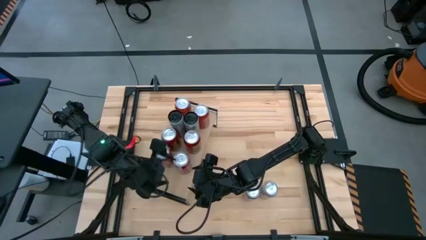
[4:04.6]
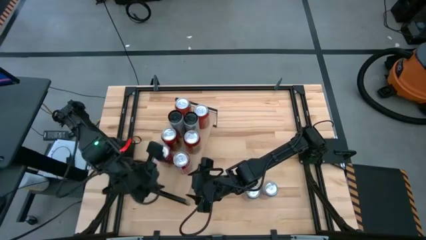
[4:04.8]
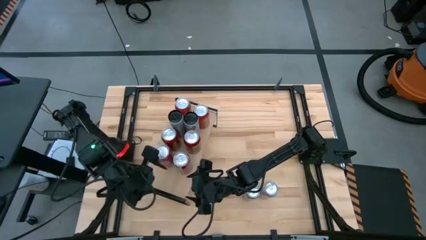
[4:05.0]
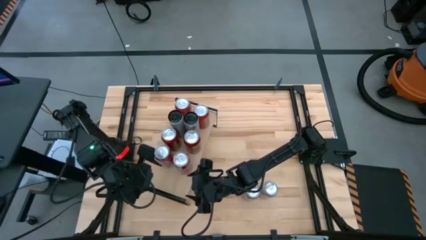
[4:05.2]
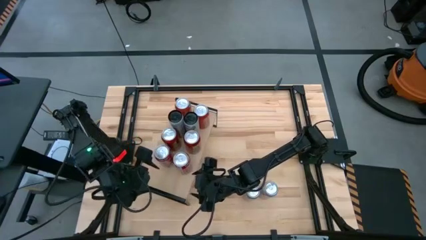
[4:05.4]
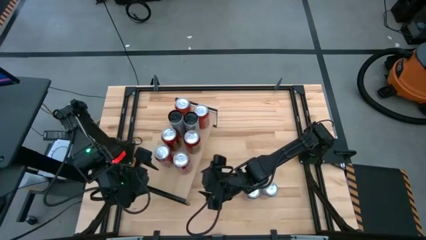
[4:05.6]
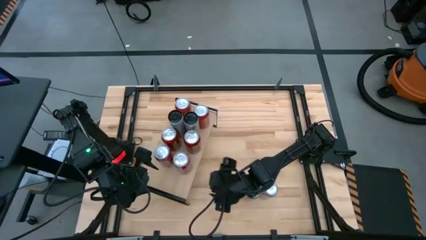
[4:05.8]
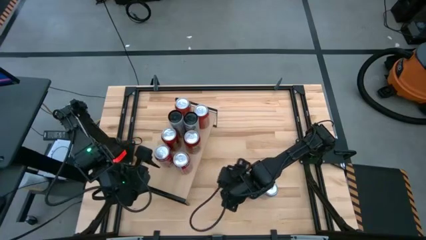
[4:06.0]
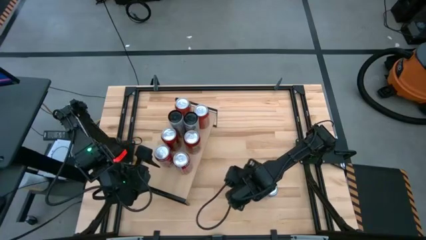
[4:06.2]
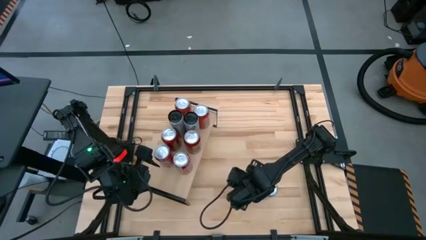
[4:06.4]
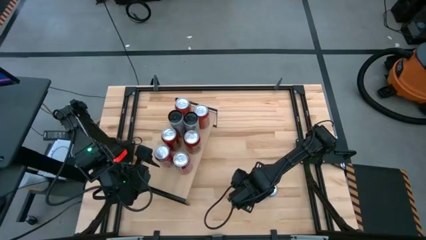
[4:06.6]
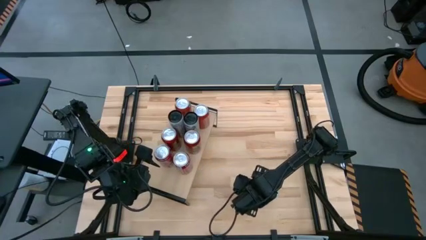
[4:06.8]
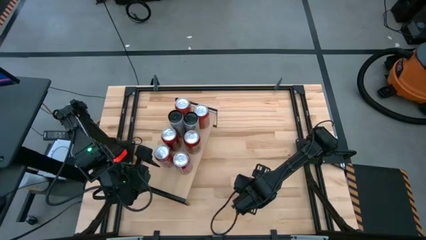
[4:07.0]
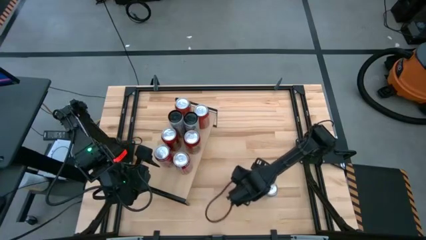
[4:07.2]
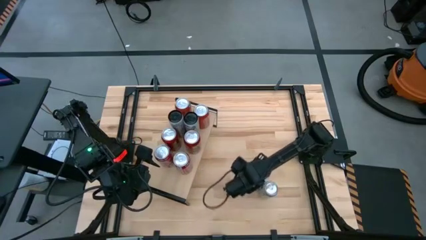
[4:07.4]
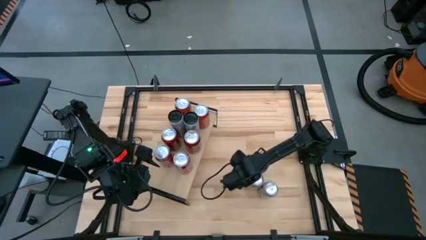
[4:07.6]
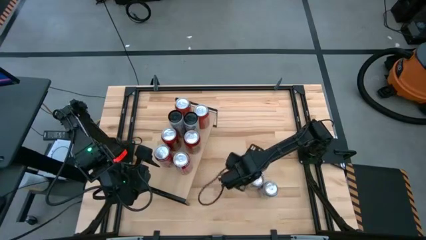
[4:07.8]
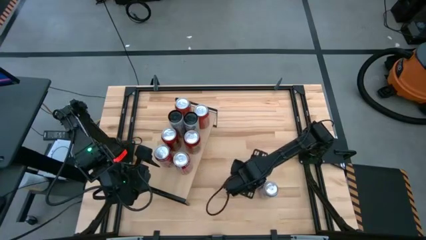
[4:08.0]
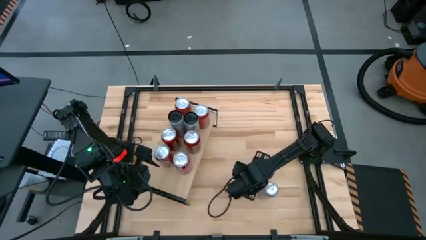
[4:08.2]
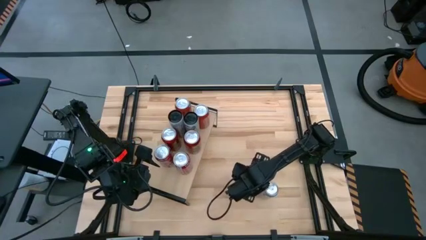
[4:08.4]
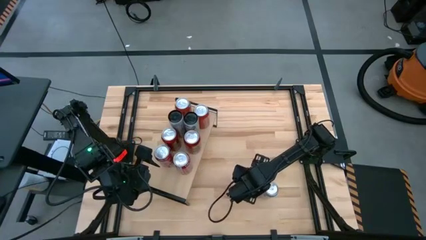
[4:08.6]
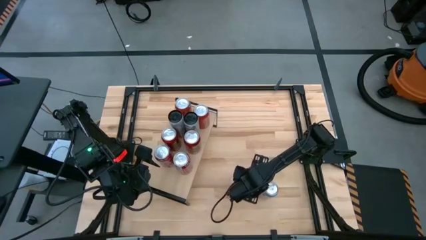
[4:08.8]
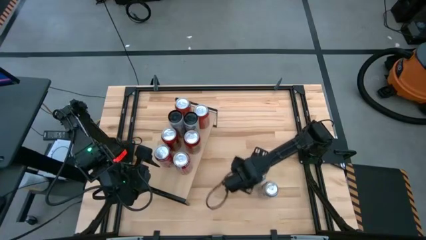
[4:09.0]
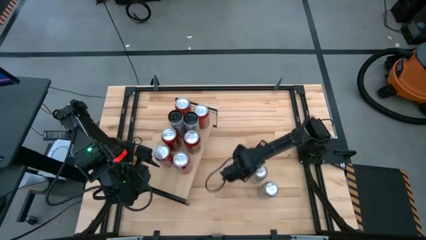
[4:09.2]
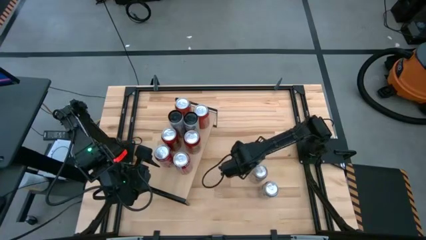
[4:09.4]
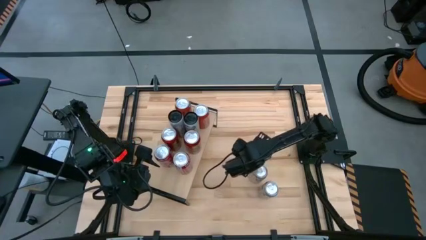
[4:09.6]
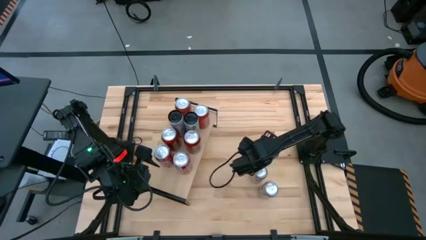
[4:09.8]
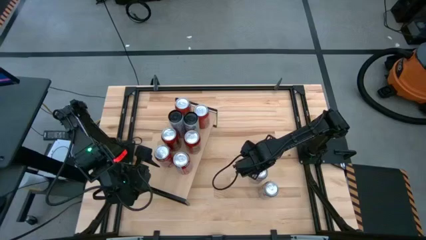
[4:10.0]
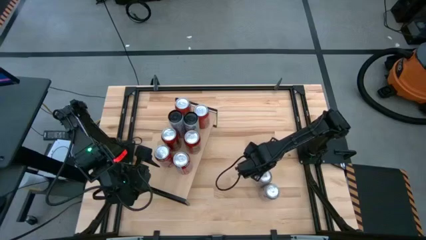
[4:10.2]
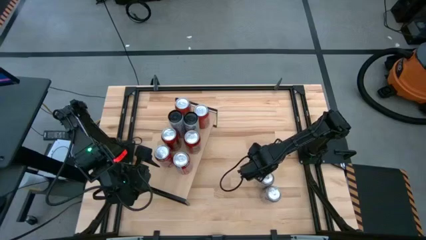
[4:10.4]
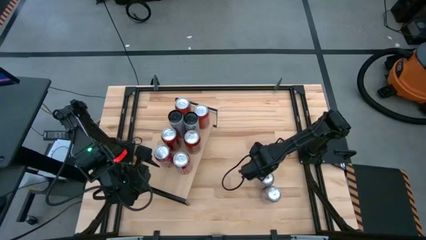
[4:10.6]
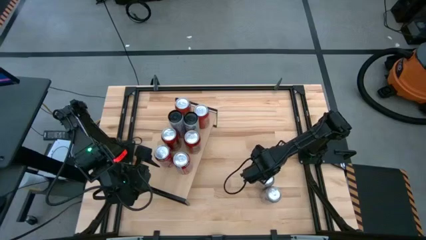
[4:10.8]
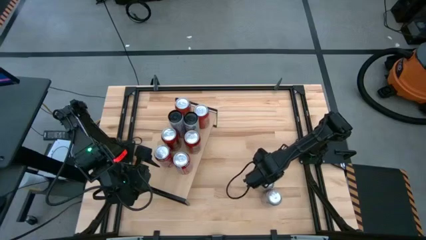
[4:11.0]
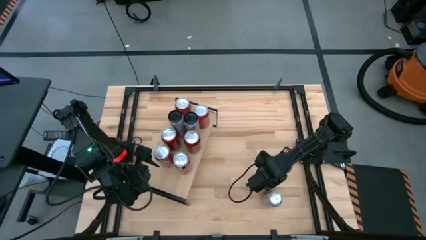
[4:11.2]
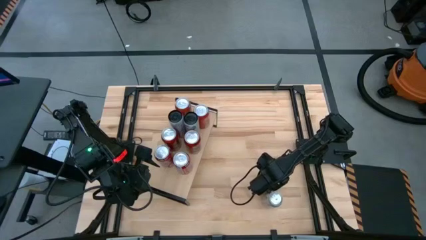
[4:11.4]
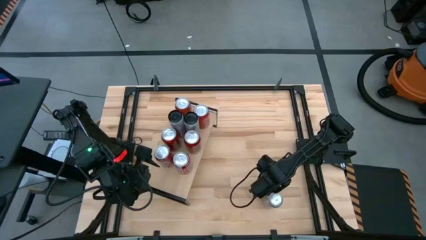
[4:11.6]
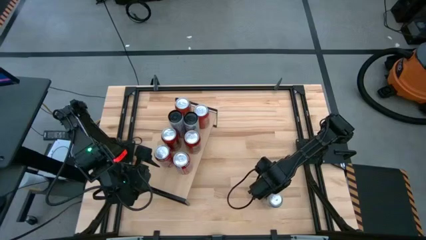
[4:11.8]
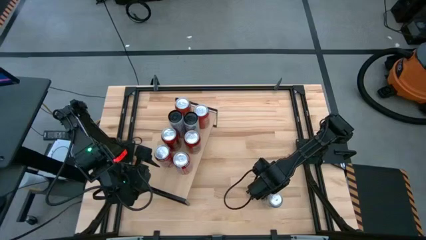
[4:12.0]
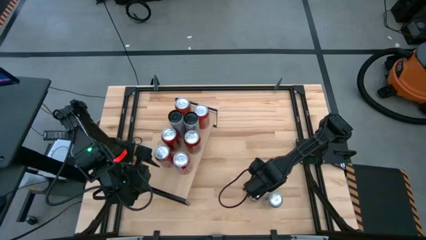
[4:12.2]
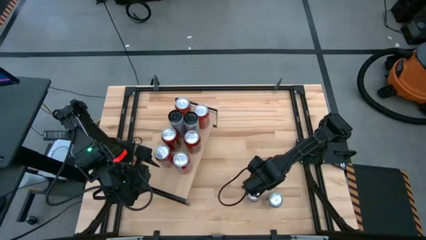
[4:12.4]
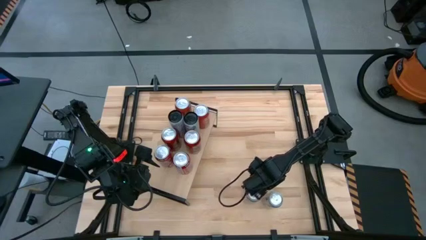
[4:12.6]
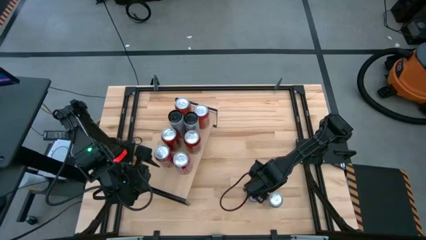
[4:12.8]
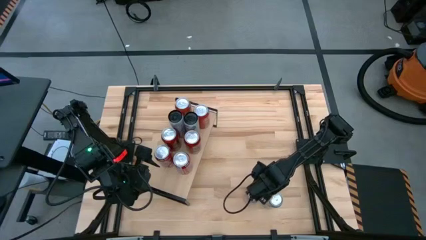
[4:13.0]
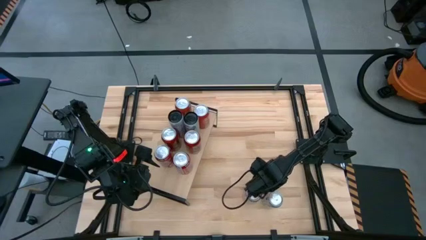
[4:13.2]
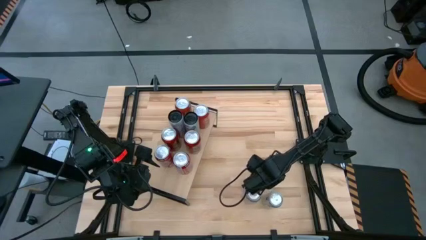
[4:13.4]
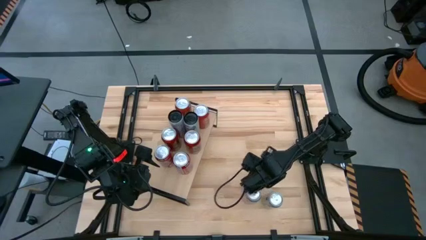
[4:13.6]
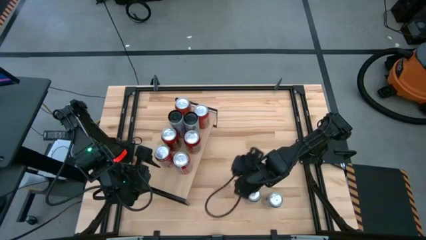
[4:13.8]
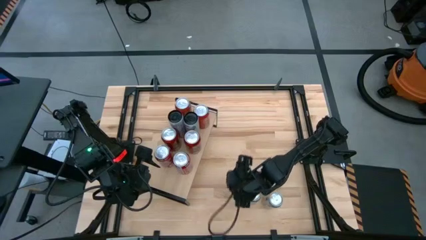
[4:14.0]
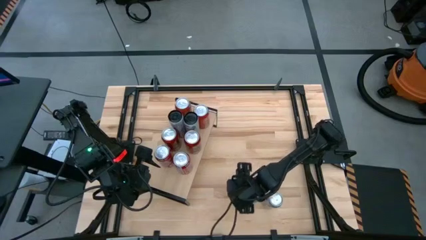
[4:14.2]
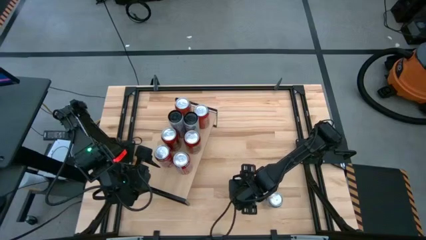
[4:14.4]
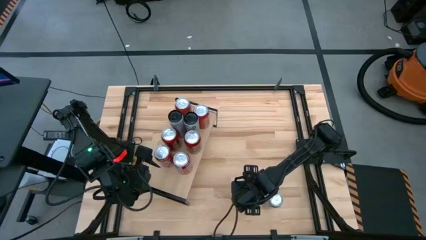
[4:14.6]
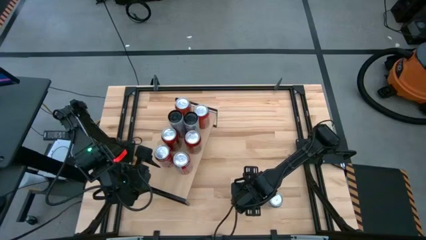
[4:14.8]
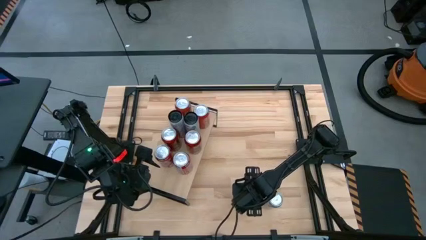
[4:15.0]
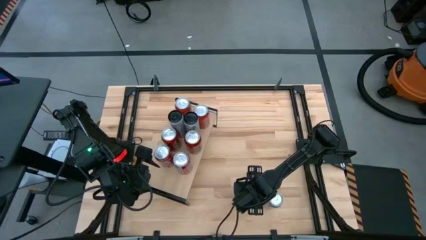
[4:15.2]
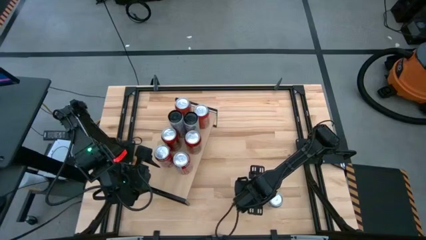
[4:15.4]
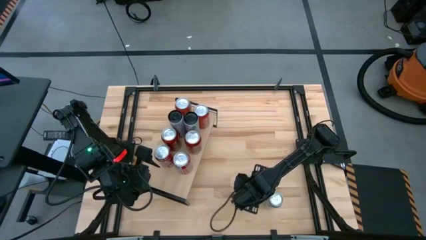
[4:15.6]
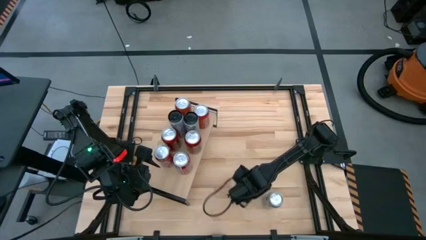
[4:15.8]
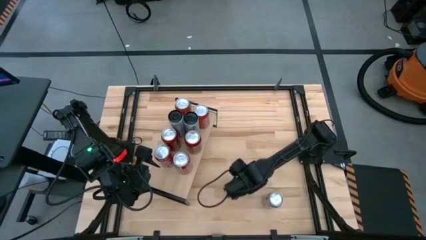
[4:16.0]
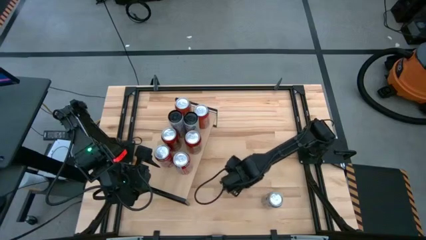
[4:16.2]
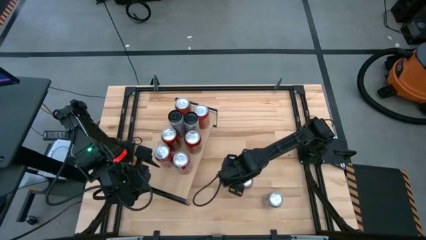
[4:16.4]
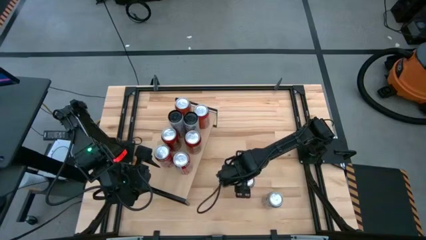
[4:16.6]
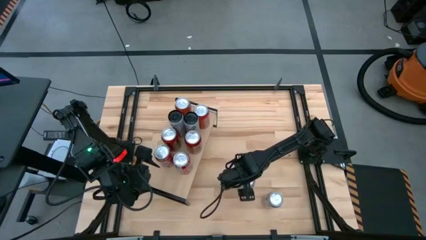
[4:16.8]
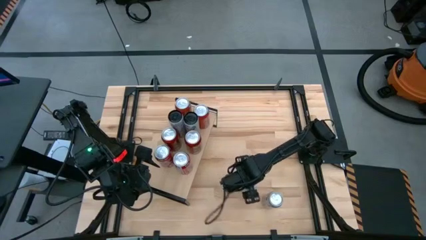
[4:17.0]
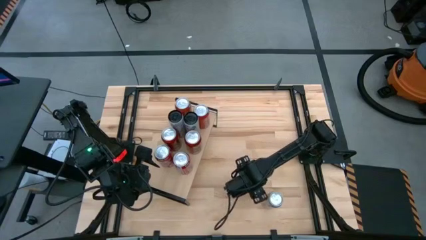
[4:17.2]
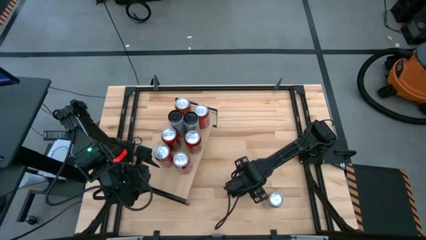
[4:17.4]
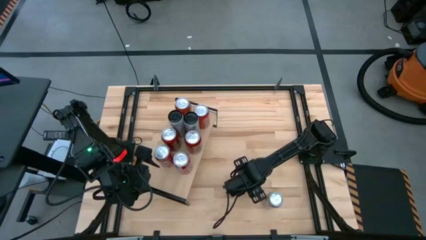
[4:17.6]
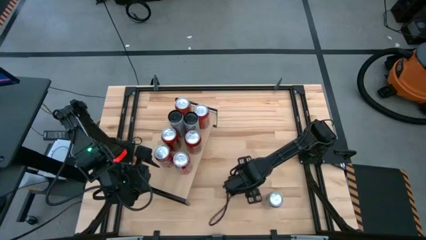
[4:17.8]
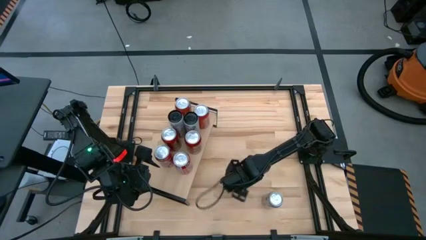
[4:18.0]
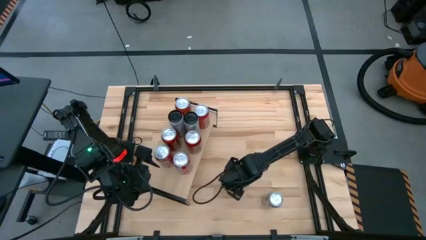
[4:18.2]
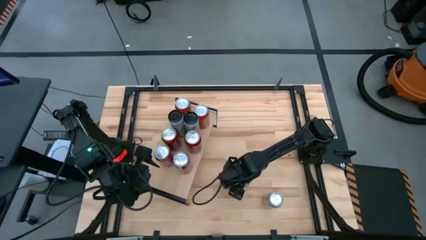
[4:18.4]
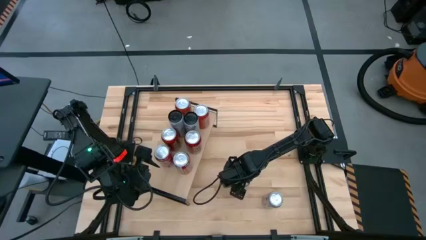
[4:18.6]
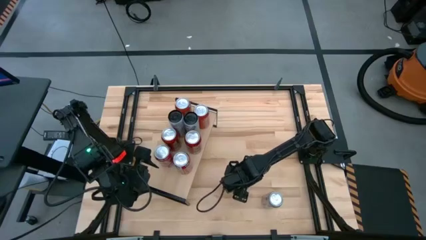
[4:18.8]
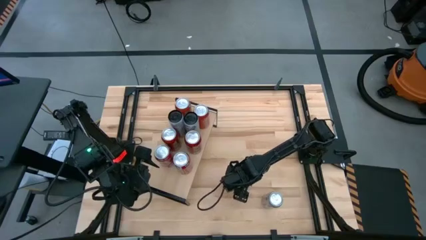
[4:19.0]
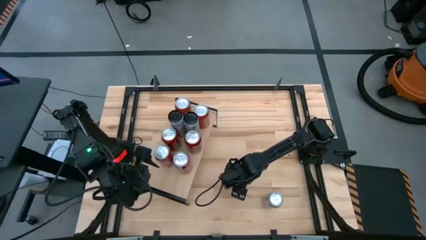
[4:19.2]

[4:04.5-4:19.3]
Task: Place canned beverage on shelf
Put the left silver soda can on the shelf

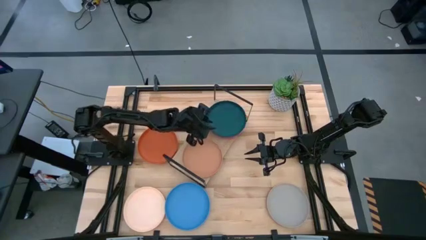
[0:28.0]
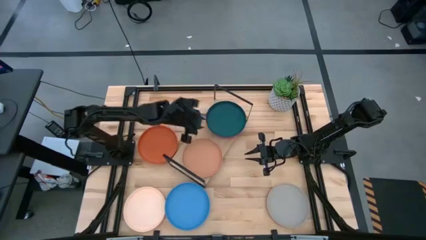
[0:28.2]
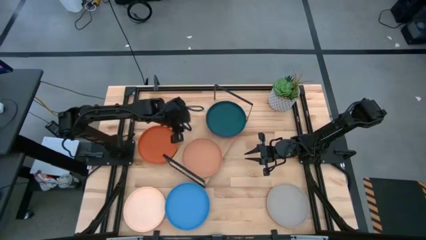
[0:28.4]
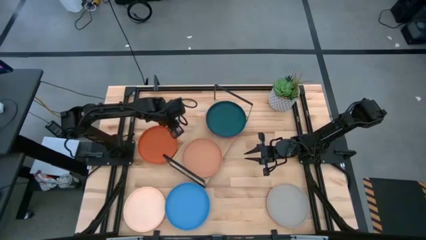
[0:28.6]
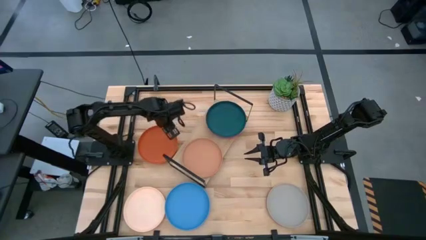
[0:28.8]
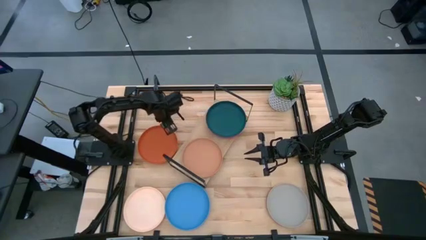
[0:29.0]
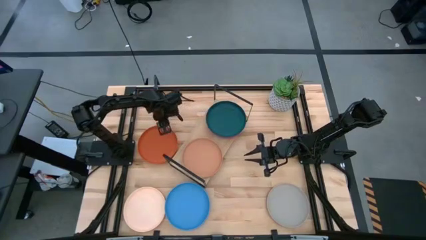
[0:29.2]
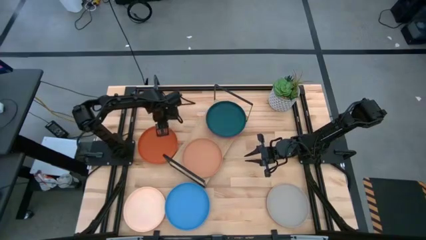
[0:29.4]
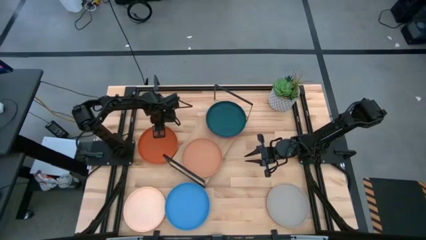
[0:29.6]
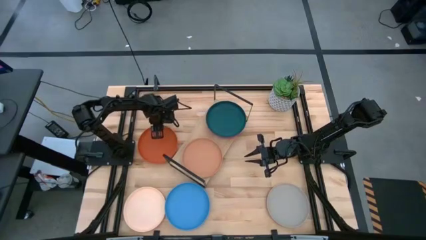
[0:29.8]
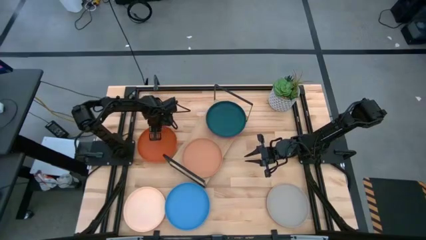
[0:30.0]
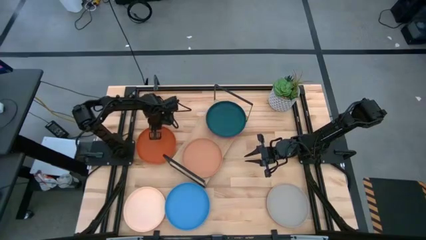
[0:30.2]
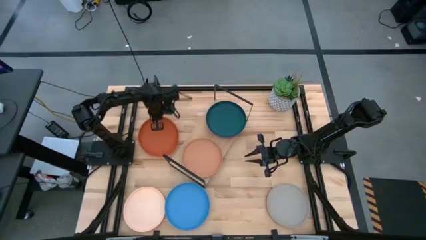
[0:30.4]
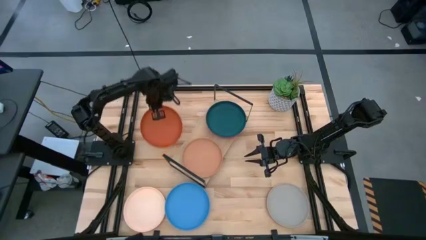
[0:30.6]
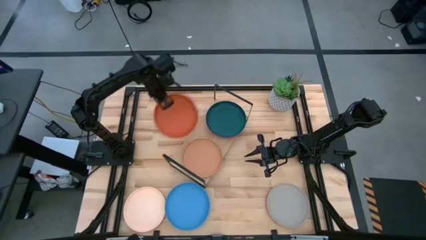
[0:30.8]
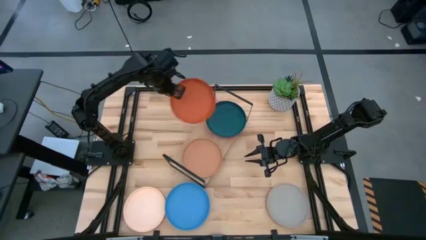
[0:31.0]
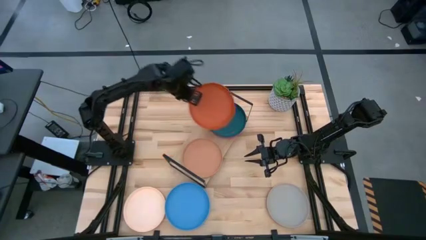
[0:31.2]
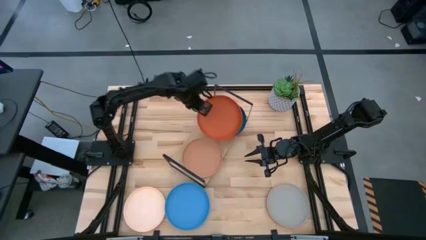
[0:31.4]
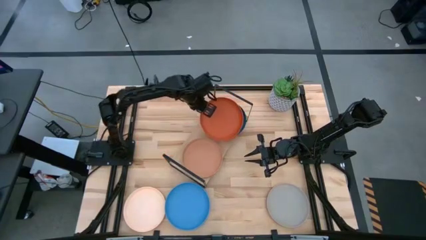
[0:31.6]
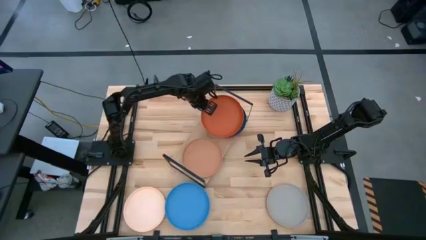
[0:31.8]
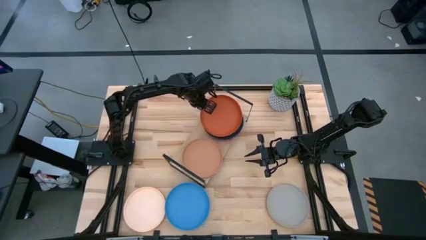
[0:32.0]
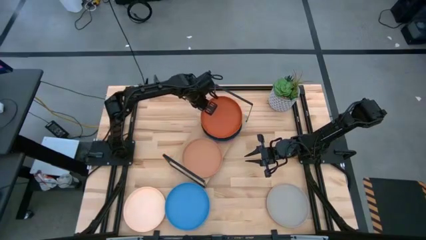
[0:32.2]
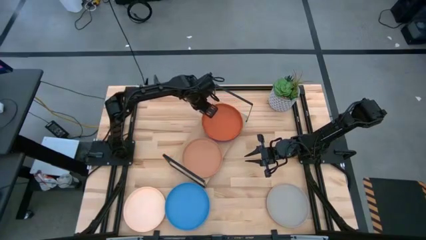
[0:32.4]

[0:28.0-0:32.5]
Task: Place and stack plates onto a shelf
Stack the orange plate on top of the green plate
